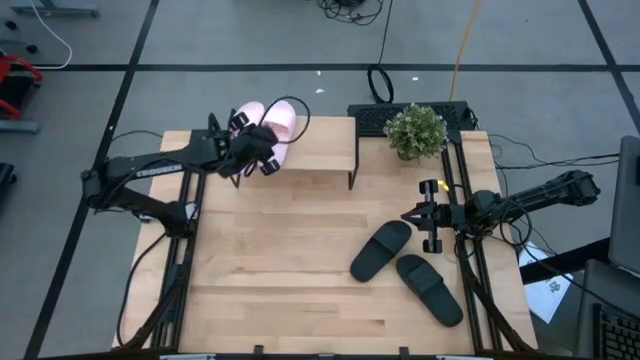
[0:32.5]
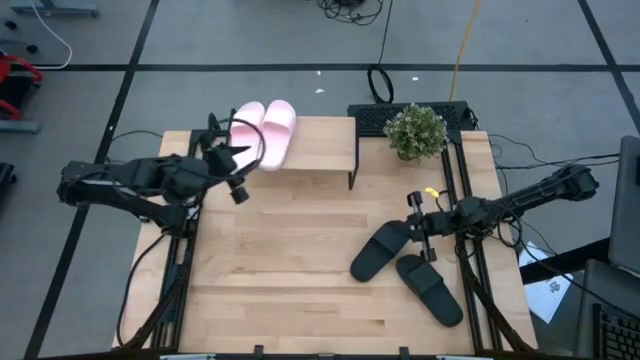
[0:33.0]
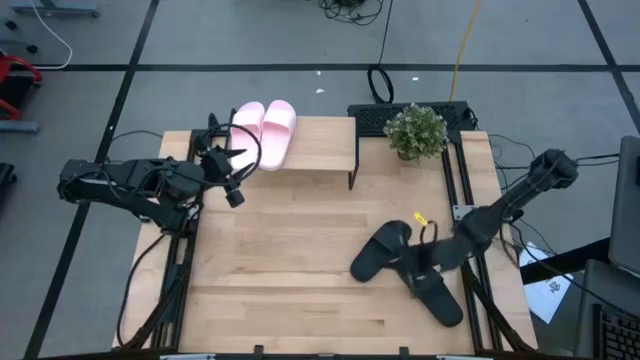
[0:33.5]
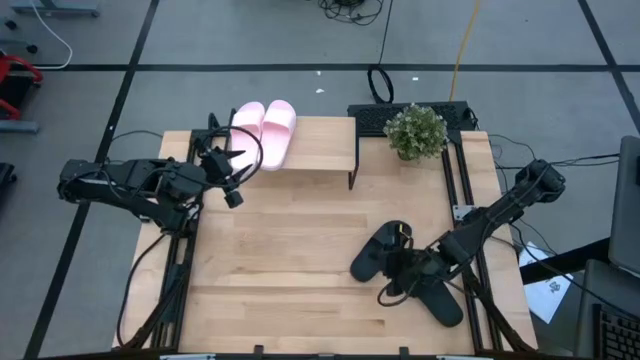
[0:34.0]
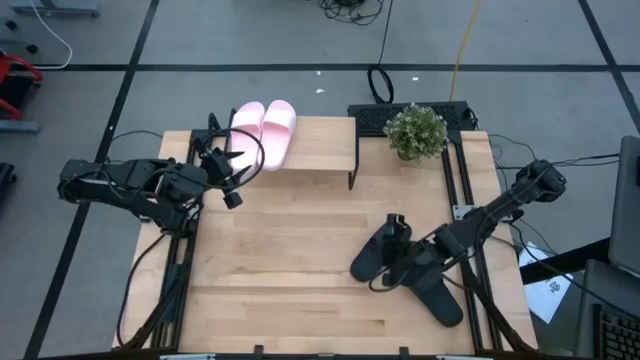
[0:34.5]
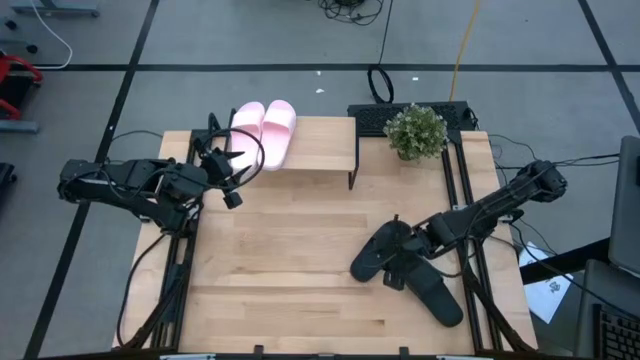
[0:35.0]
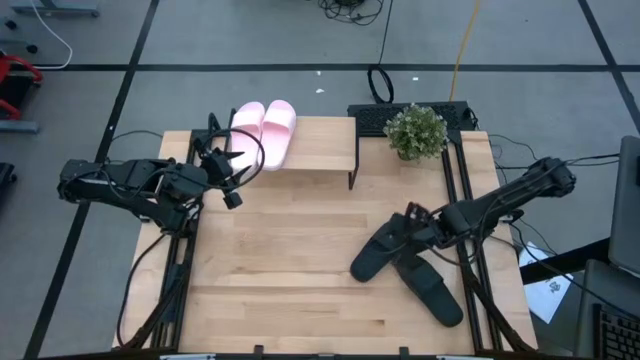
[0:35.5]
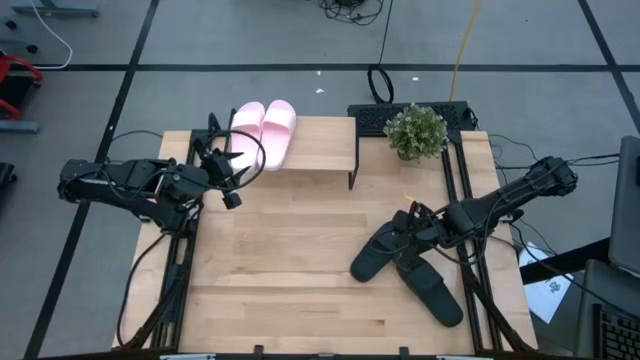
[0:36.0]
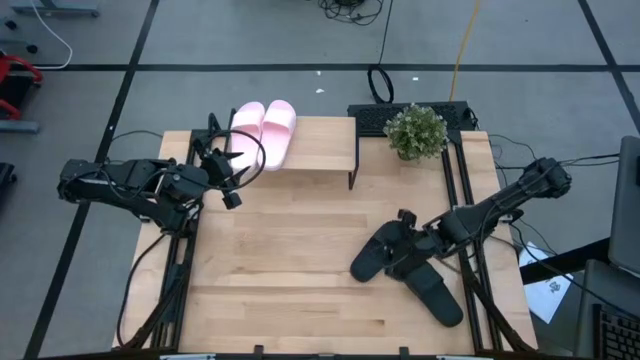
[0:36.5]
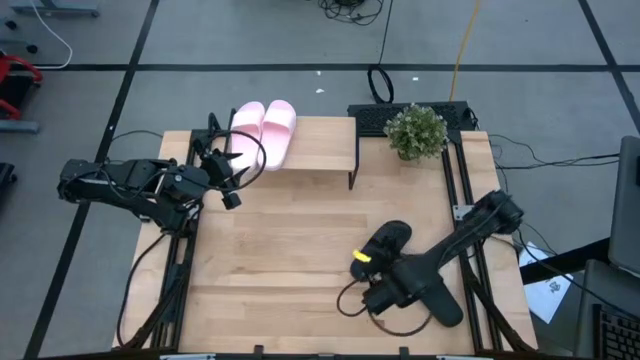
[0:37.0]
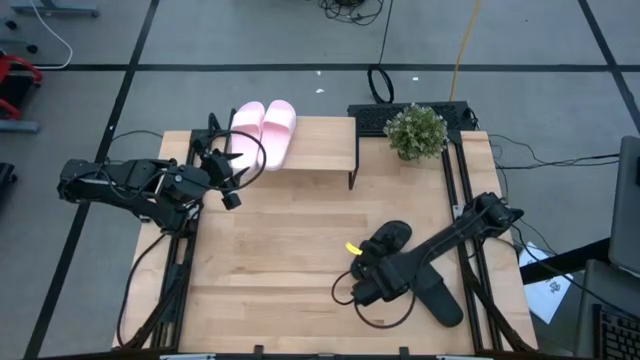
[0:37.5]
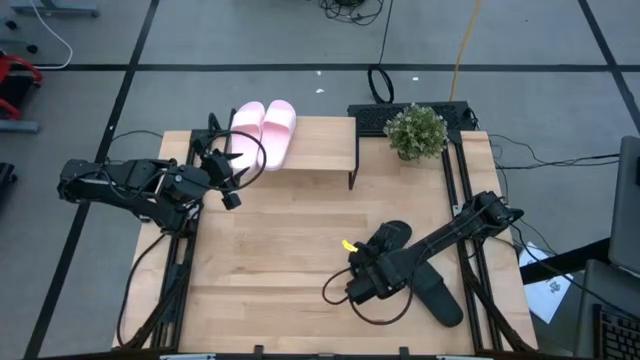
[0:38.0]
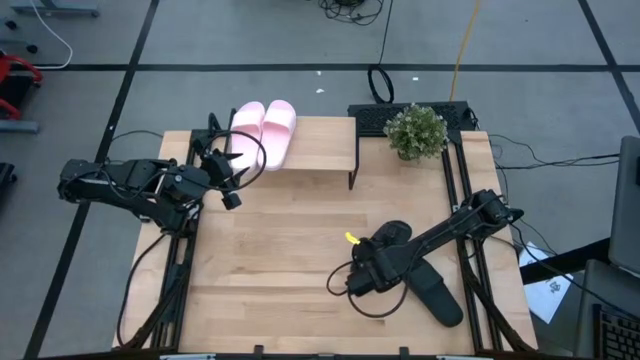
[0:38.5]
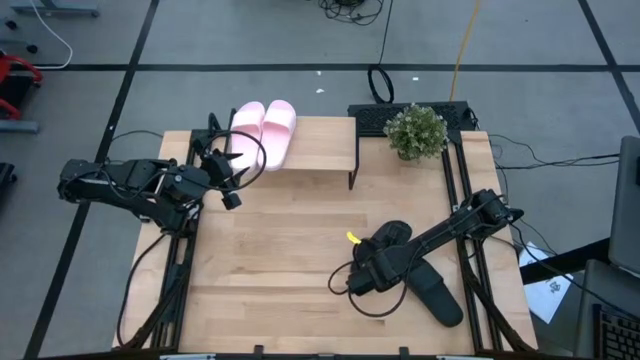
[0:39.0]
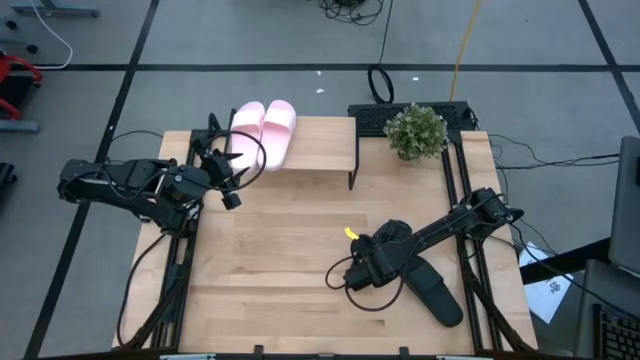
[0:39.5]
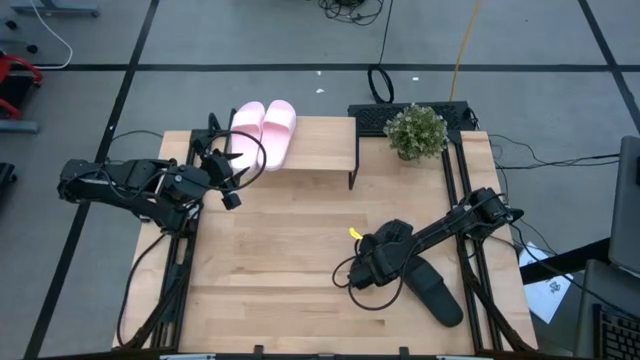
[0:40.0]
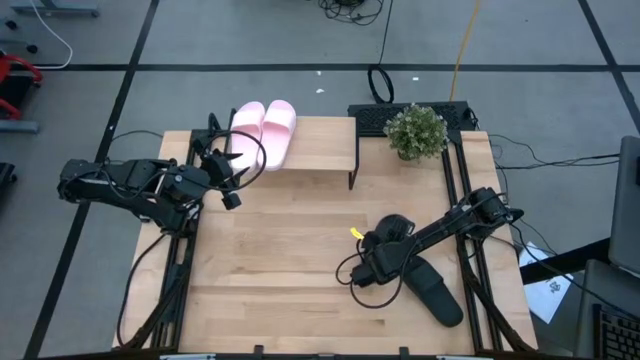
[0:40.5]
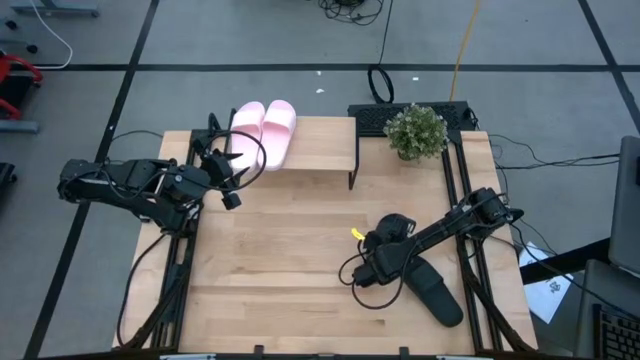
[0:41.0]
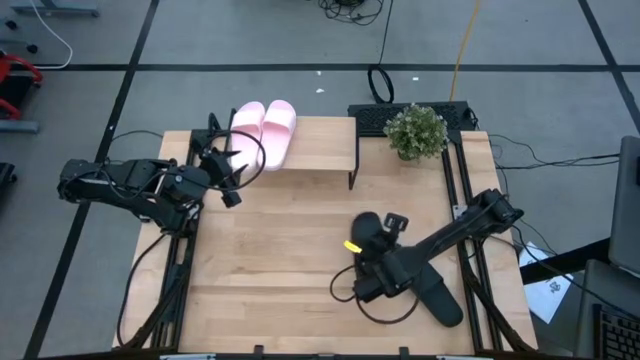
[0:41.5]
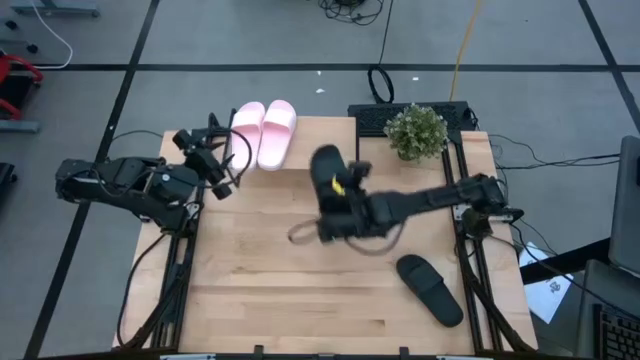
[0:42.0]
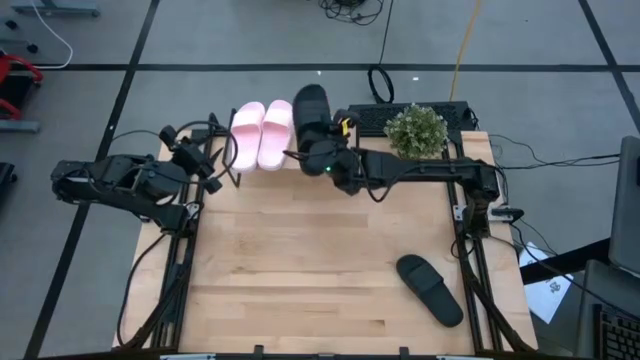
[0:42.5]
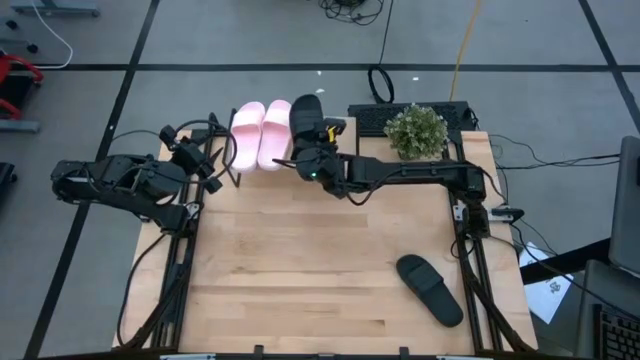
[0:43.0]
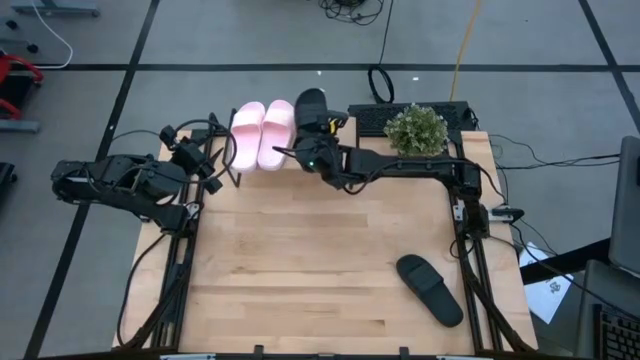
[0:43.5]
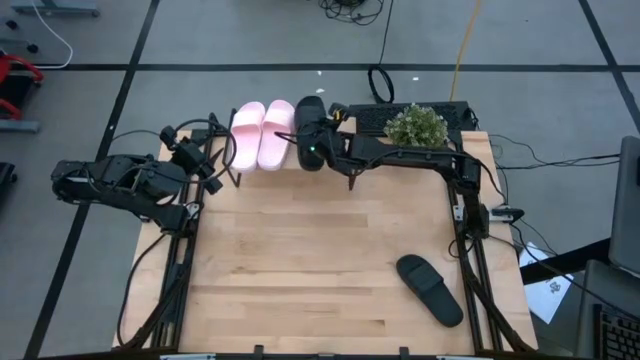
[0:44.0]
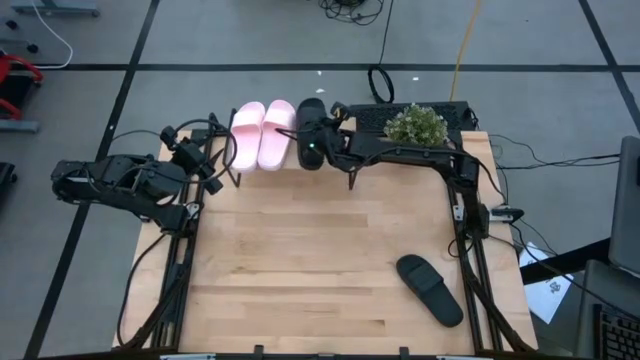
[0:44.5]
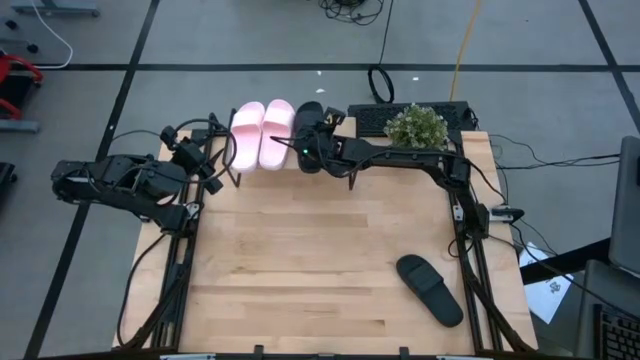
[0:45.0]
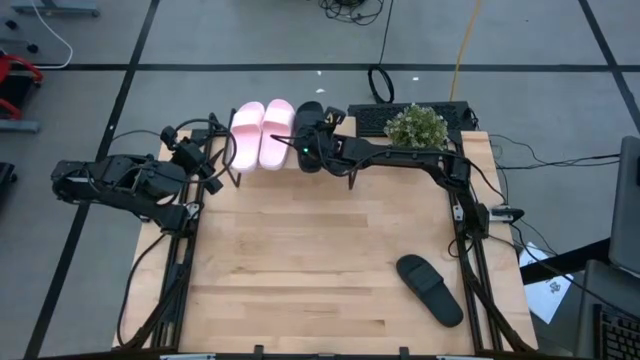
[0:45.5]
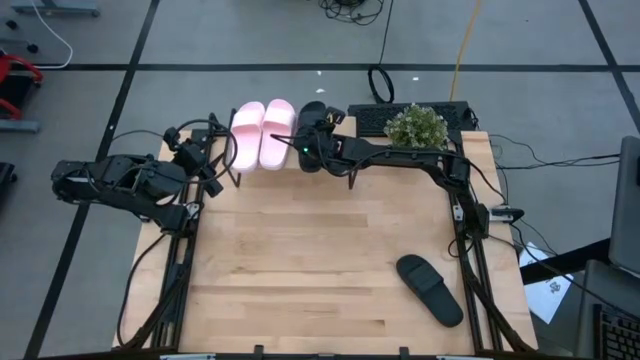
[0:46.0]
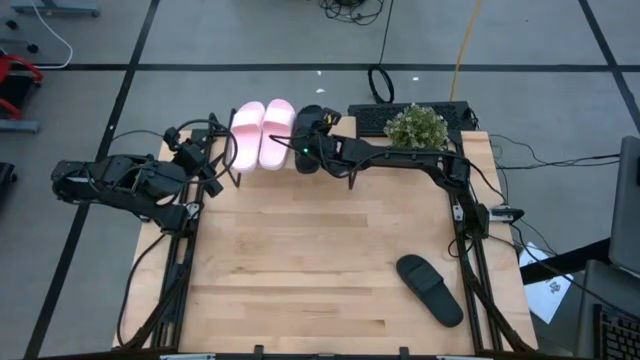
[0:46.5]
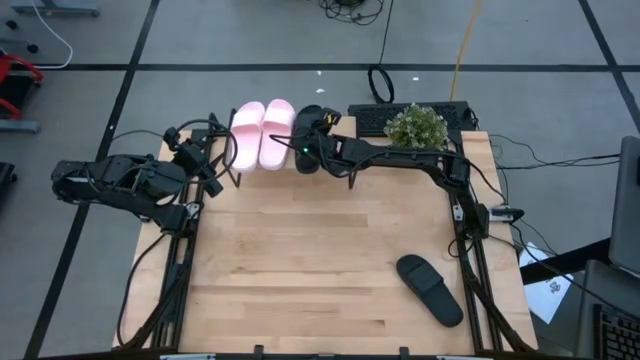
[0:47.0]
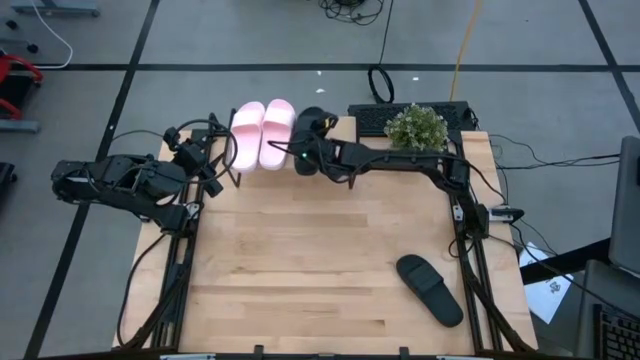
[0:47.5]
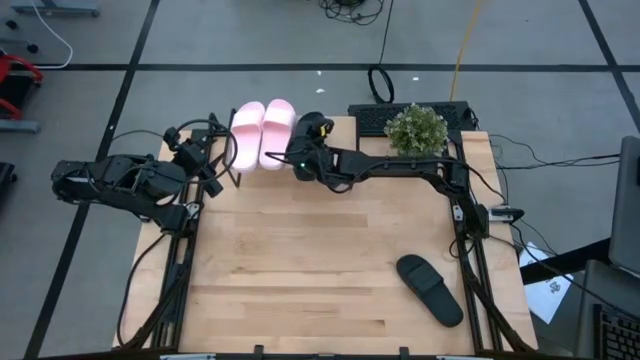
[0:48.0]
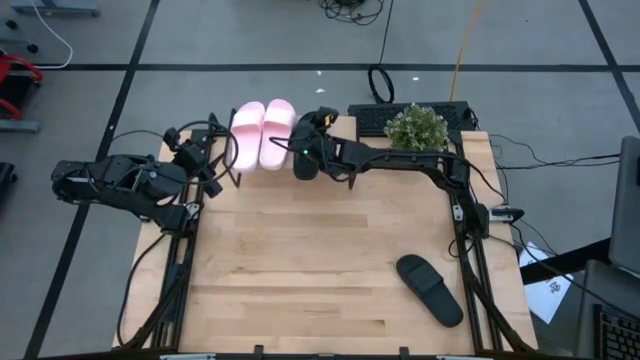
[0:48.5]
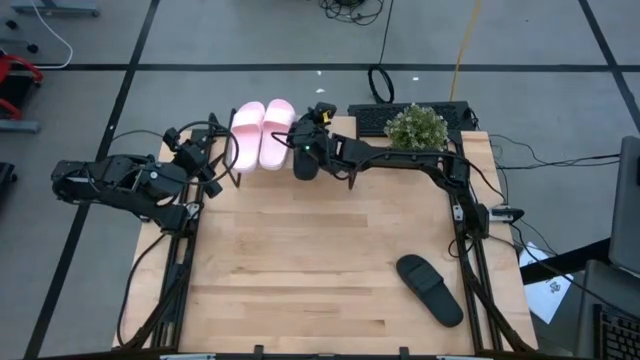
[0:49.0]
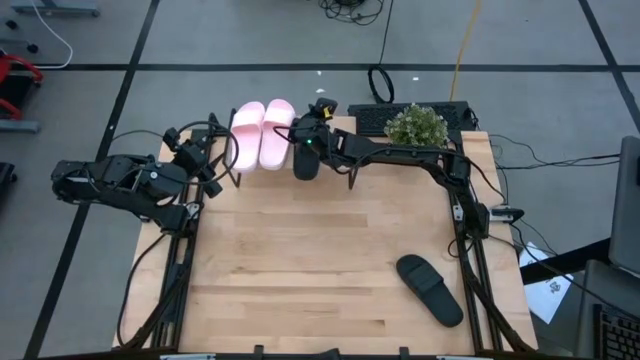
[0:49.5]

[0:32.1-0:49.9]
Task: Pick and place slides into the shelf
Put the top black slides on the shelf

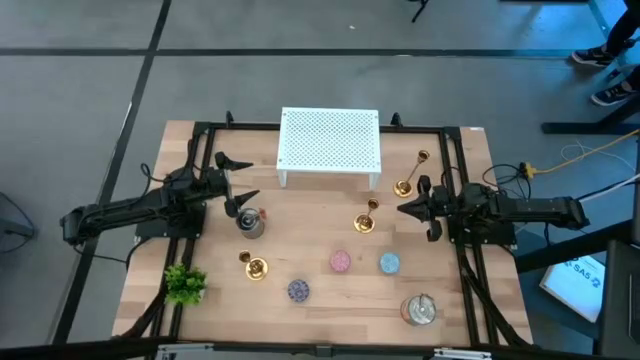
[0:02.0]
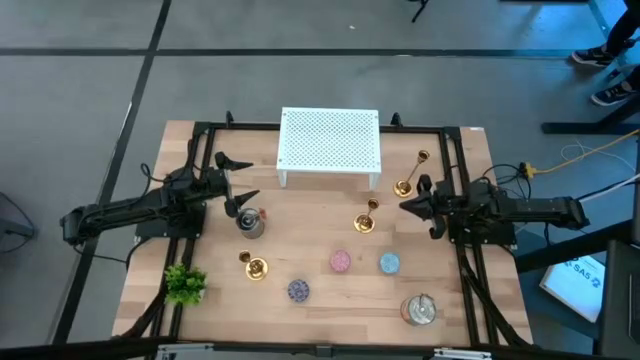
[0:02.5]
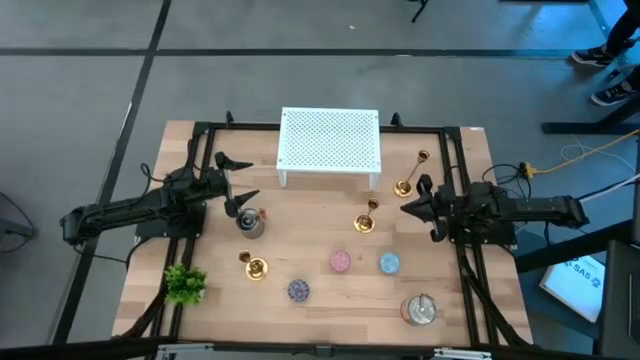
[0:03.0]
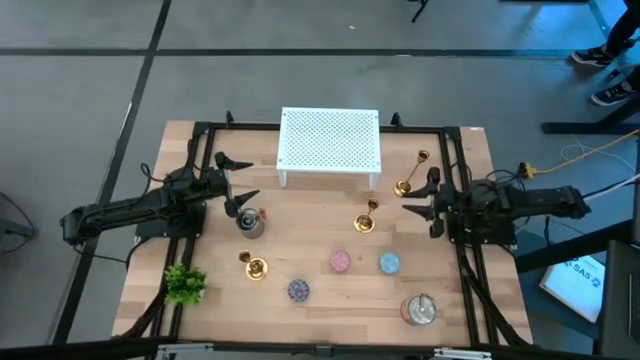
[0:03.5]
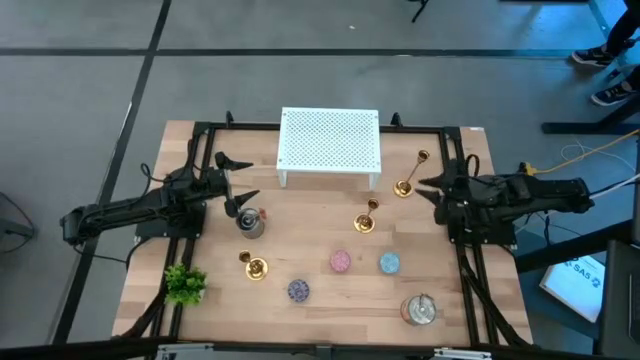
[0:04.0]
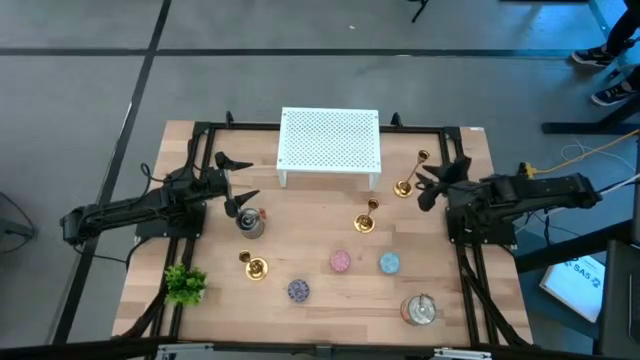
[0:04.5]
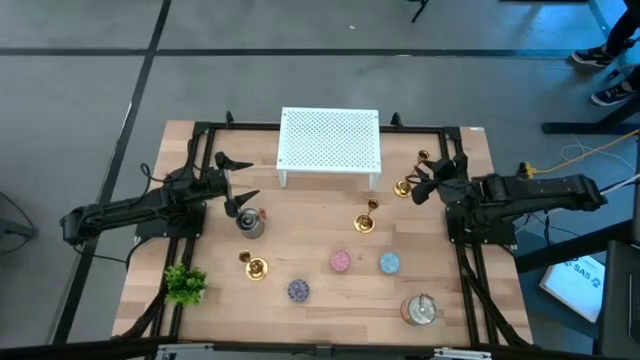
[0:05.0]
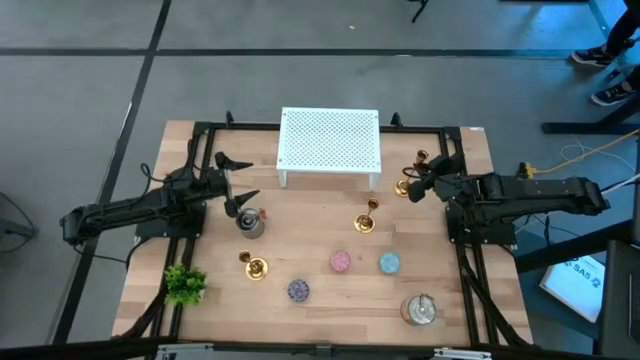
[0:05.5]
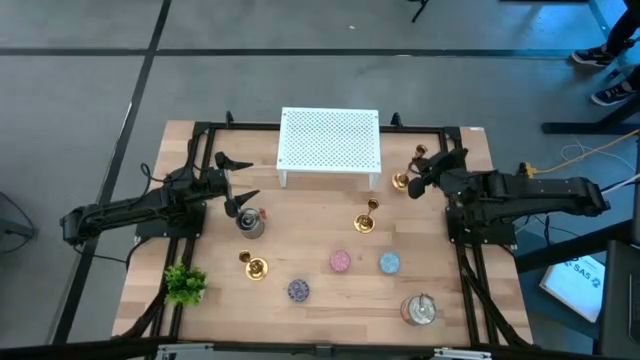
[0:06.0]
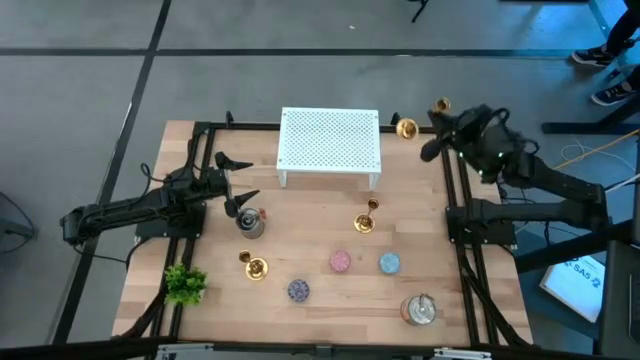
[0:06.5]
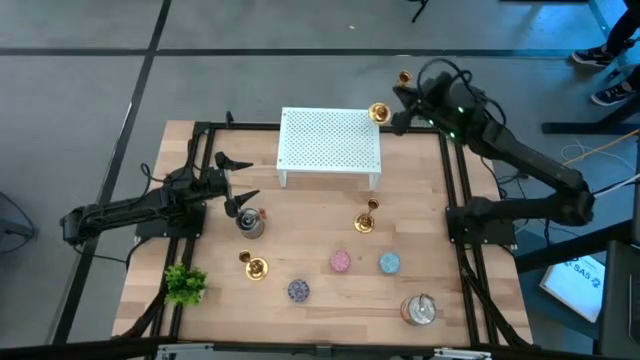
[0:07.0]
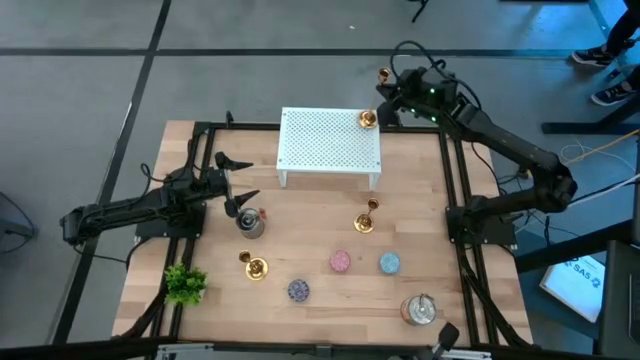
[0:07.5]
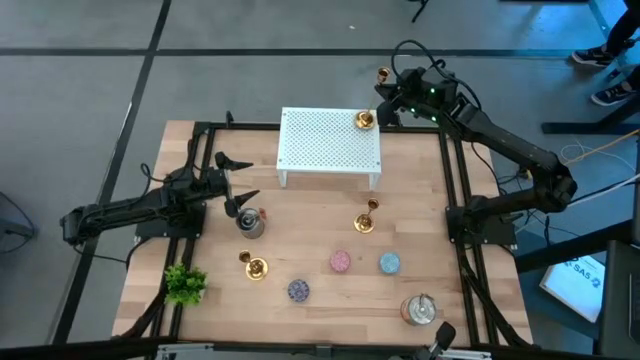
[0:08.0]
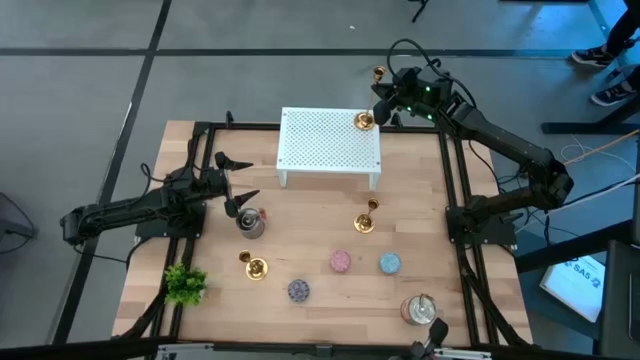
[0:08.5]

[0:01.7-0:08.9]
Task: Pick & Place candle stick holders
Put the top gold candle holder on the shelf
